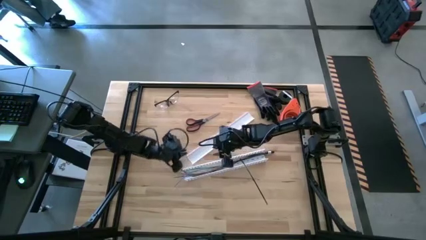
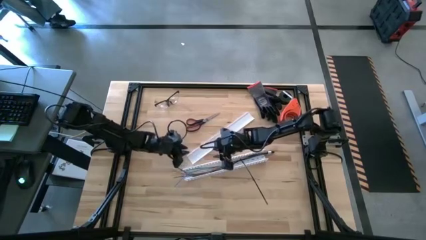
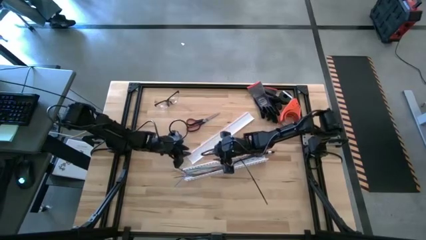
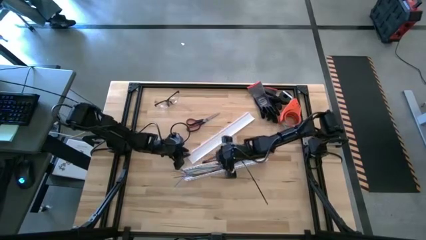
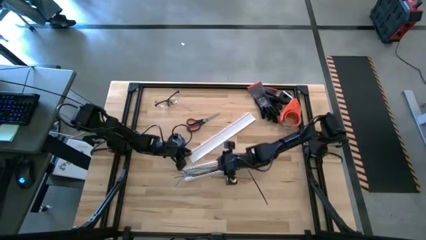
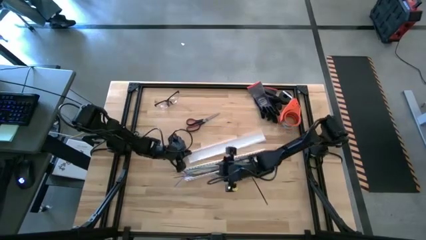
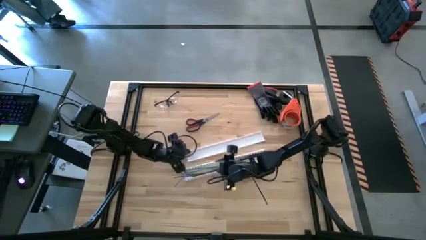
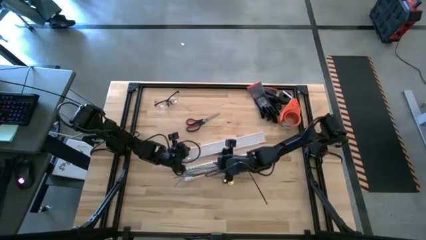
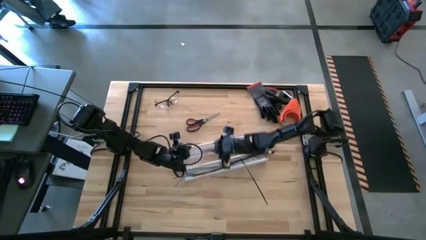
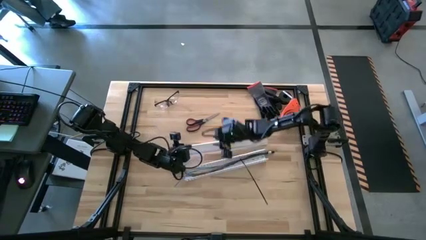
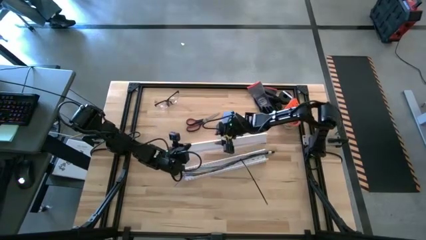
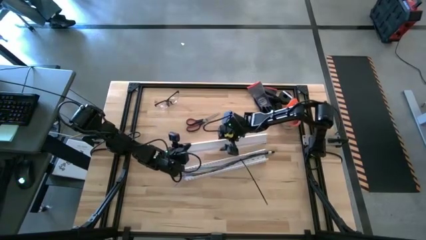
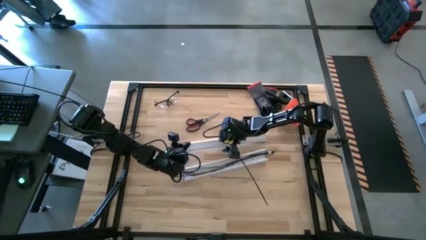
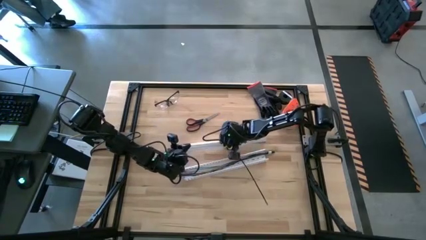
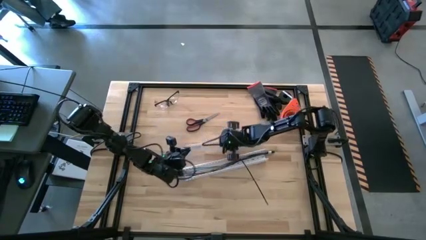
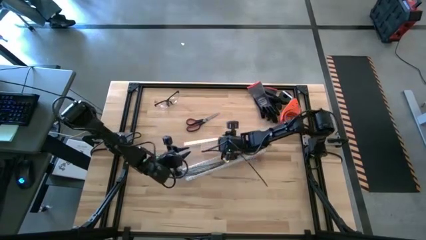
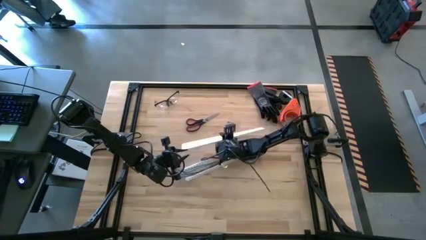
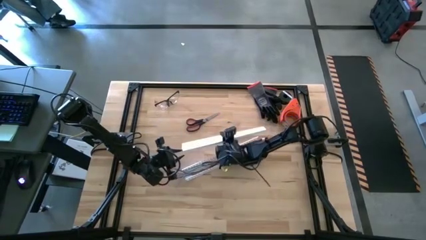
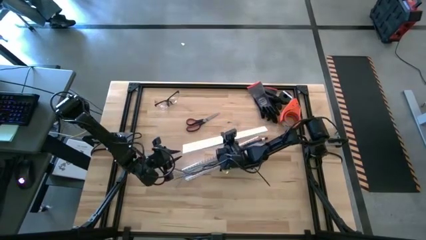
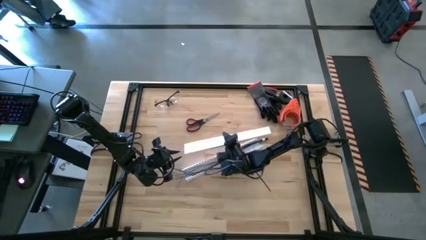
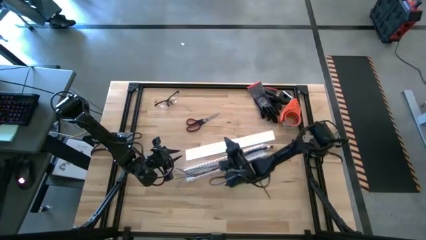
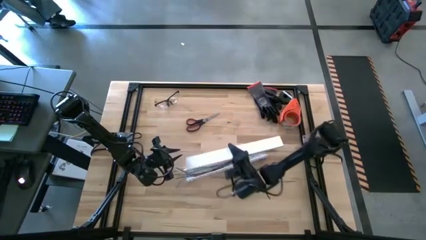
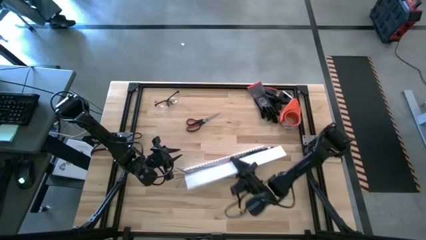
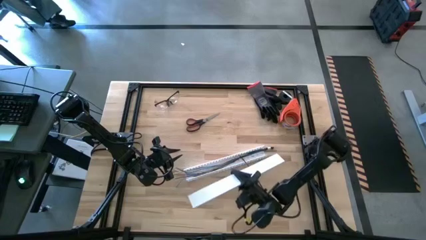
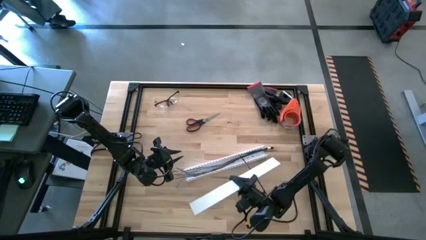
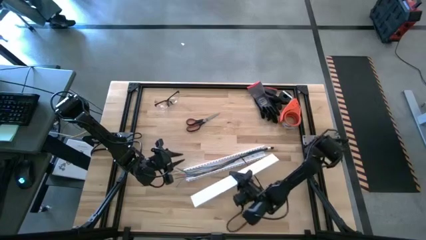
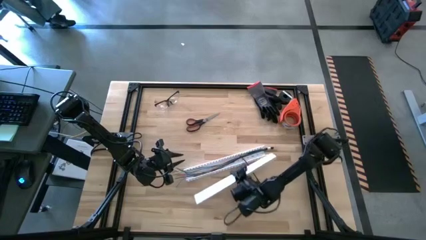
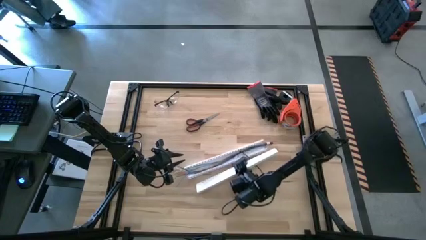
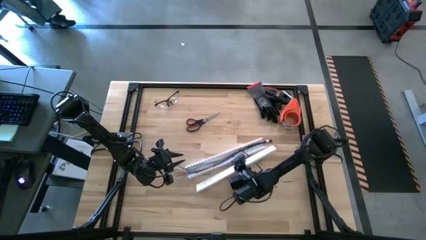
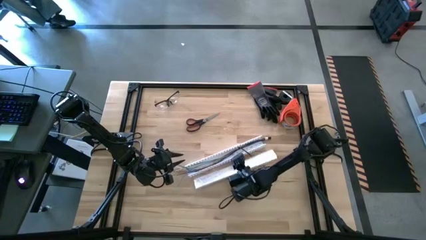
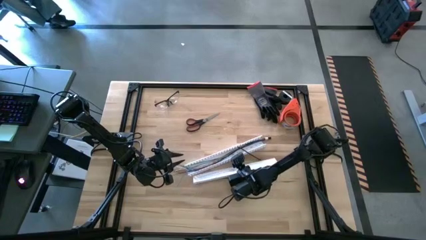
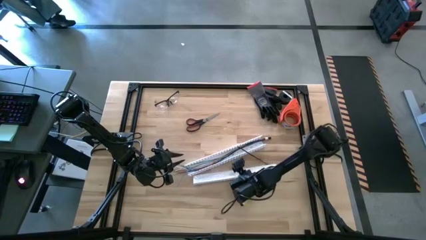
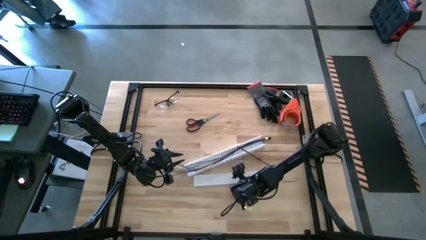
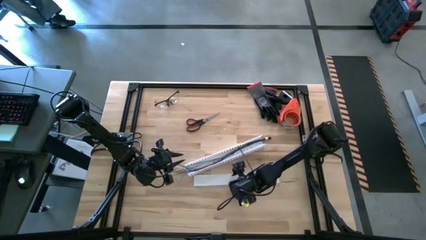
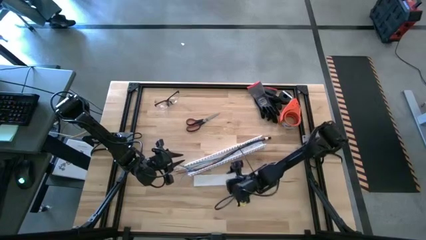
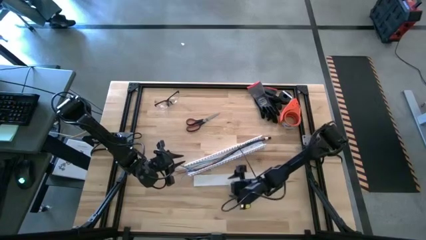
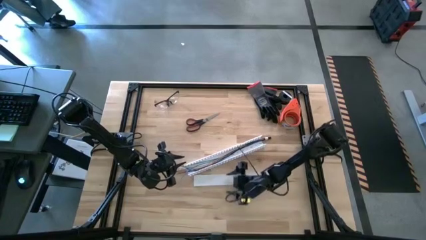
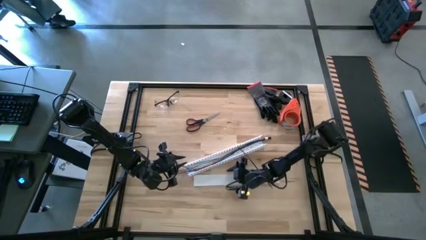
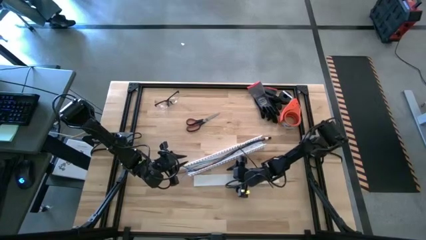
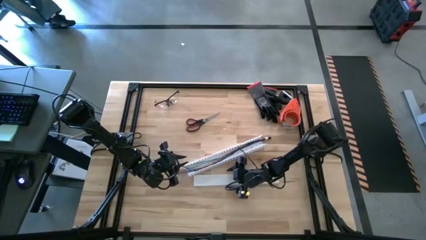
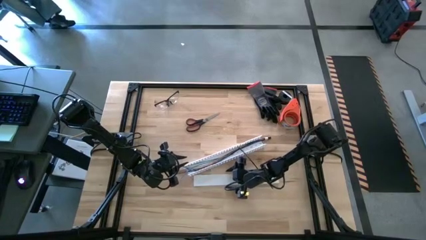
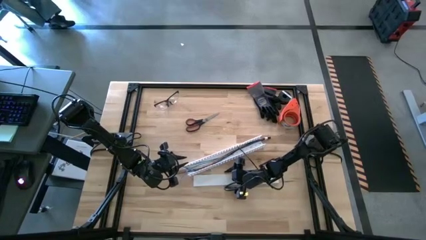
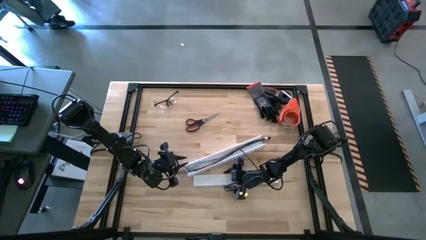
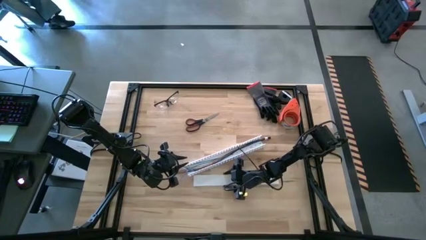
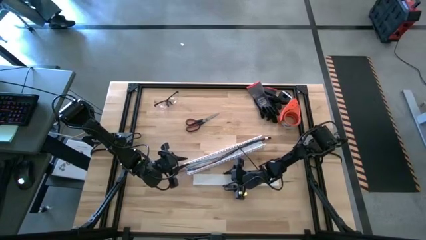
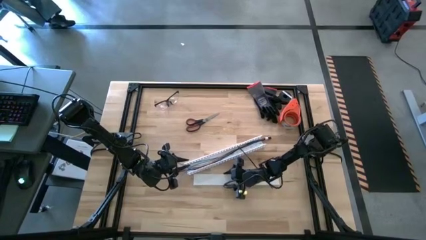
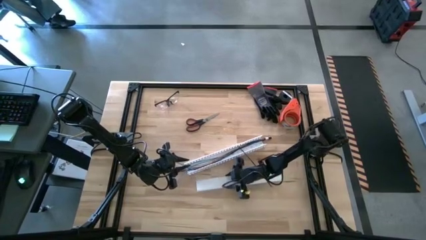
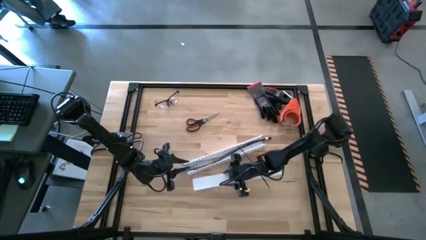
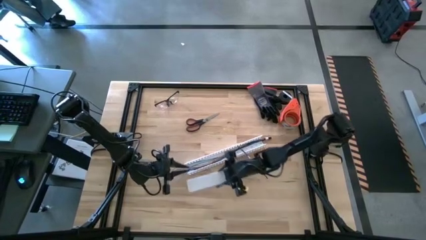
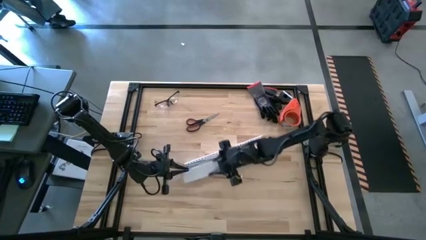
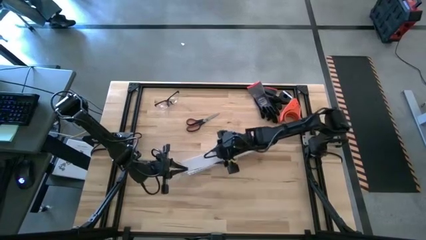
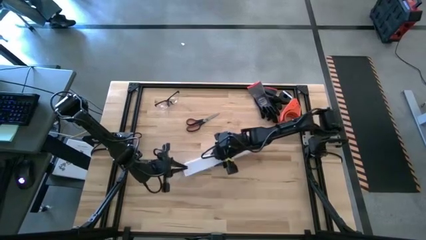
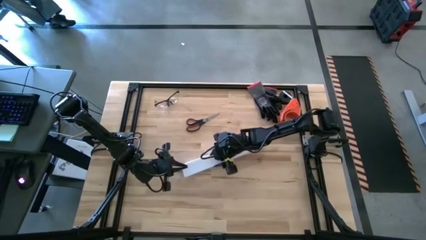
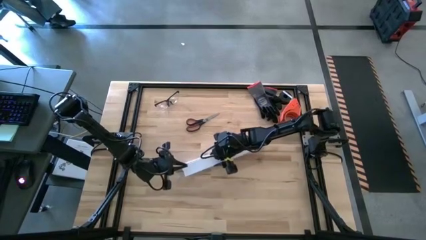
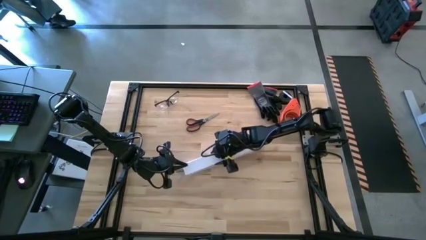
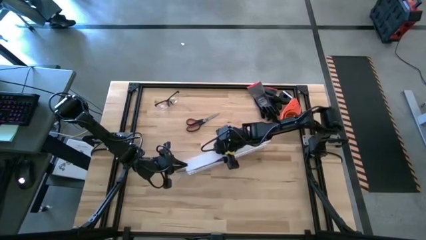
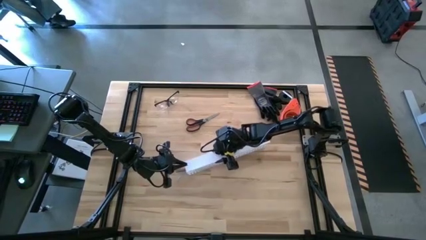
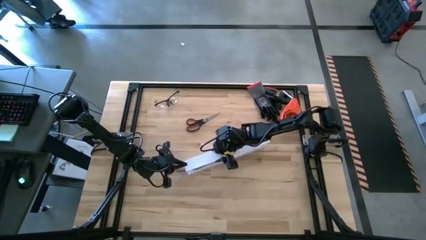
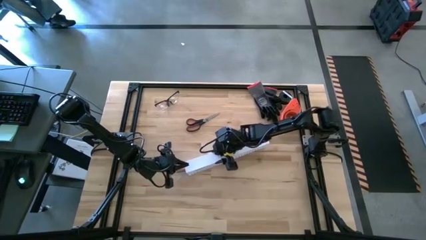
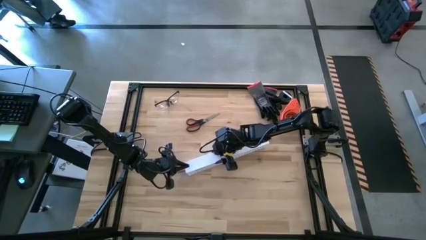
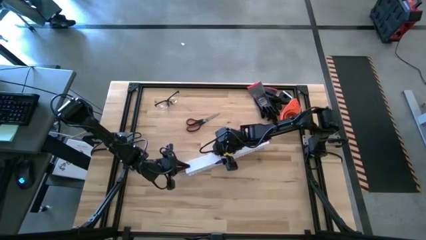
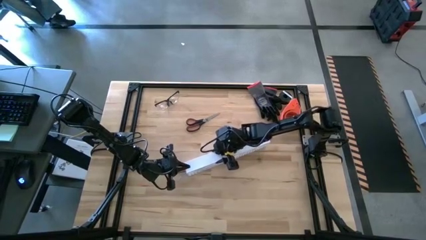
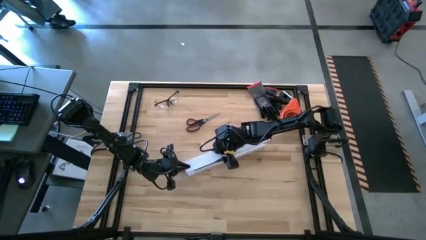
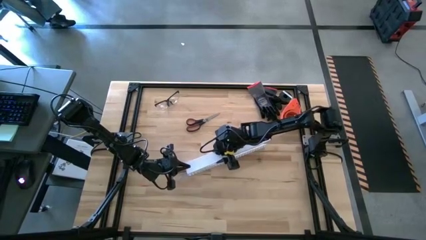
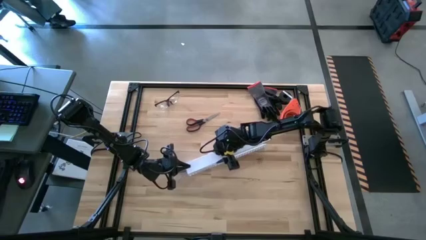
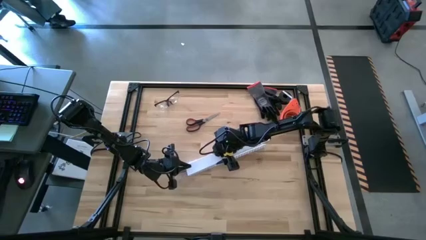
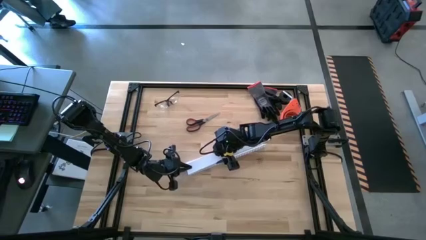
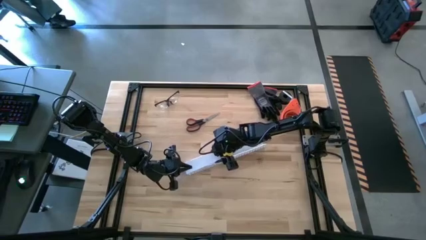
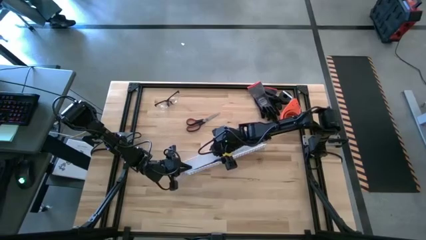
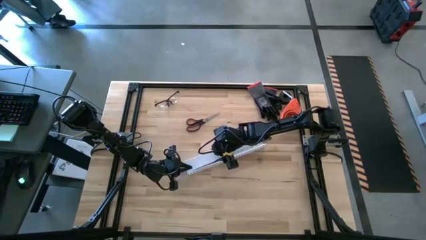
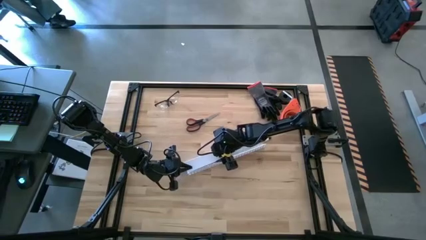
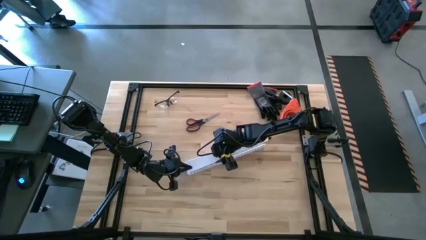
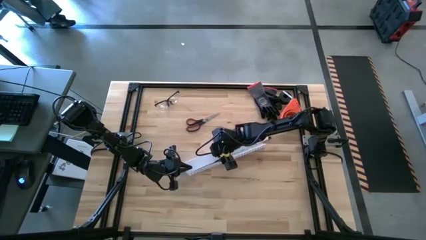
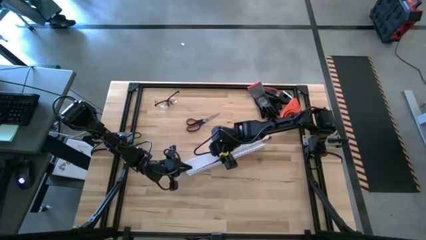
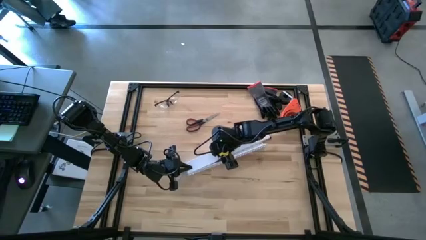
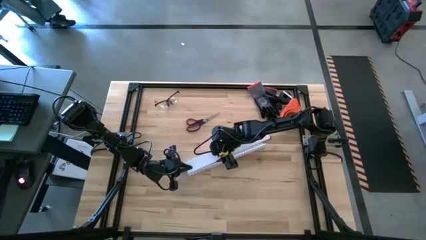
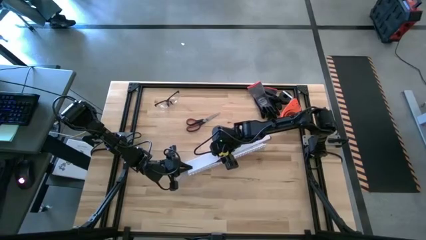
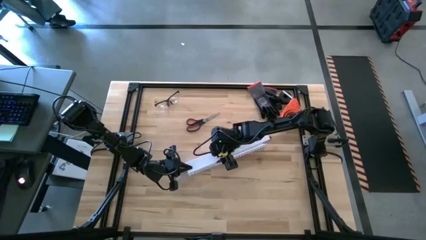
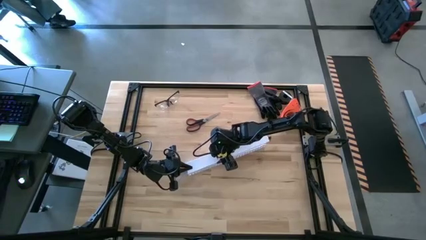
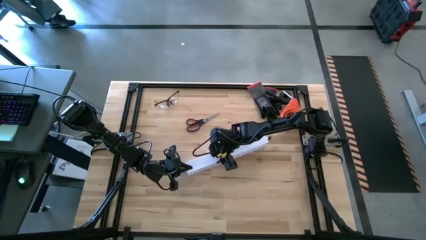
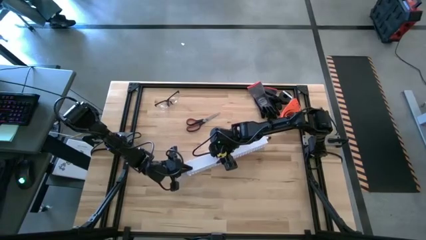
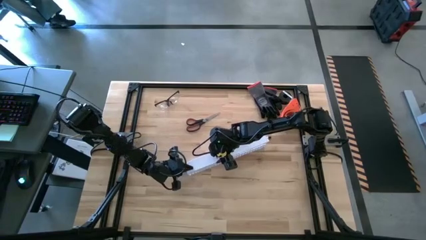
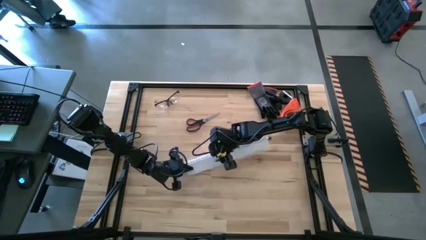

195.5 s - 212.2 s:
Task: Ziptie cables
Close the white cable duct lid
